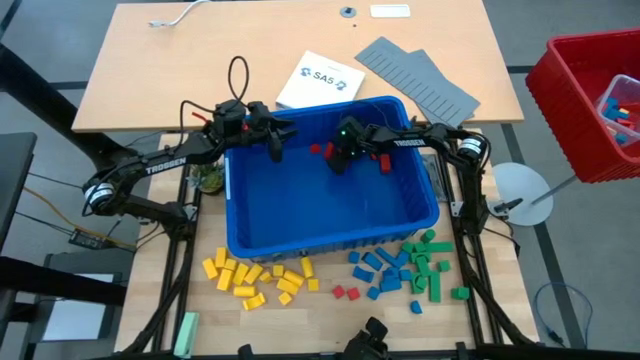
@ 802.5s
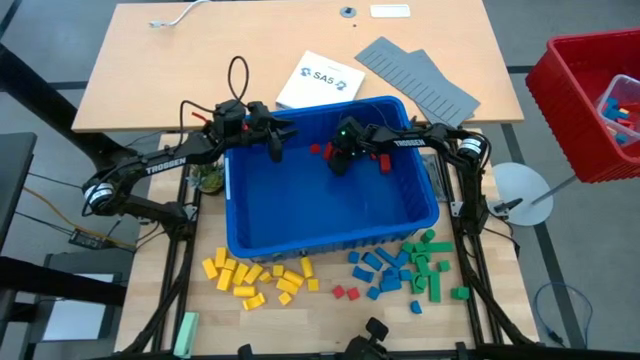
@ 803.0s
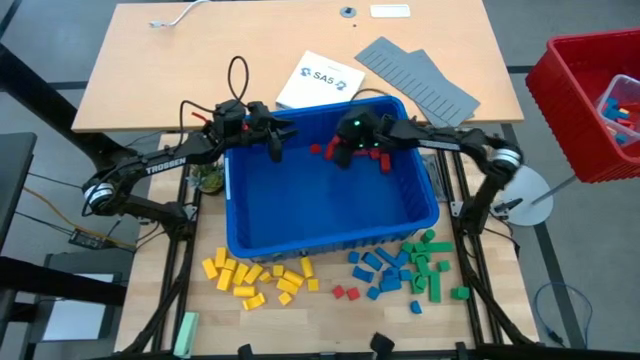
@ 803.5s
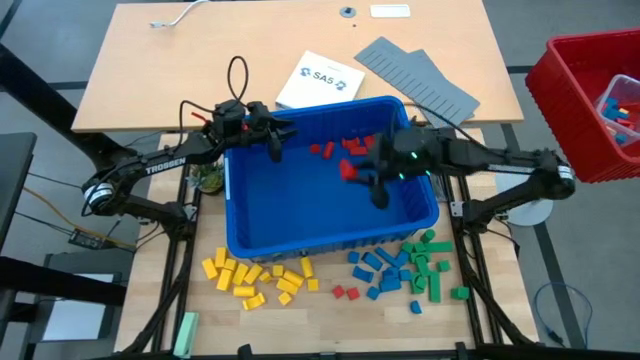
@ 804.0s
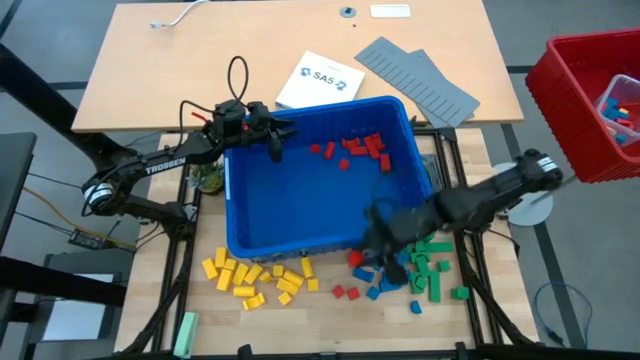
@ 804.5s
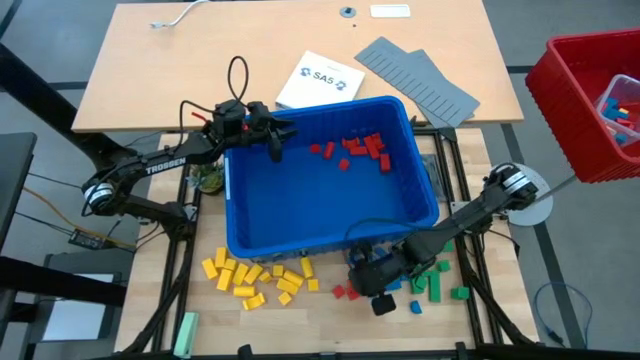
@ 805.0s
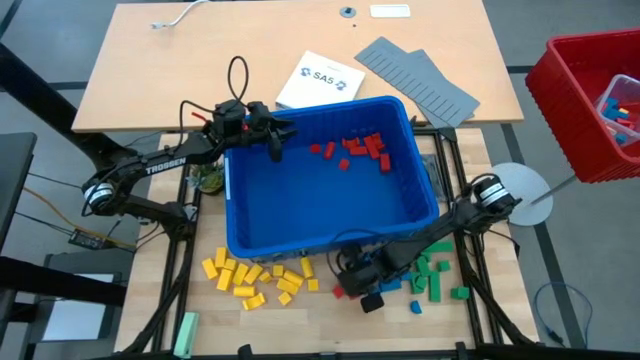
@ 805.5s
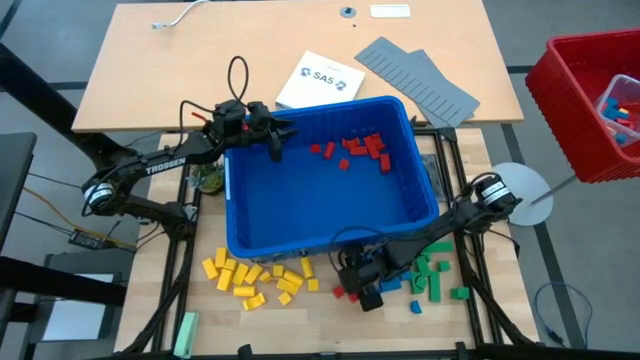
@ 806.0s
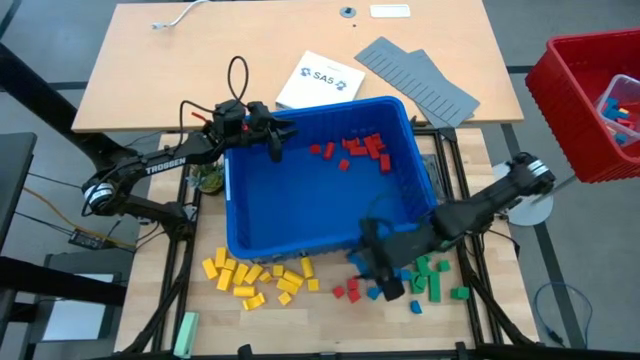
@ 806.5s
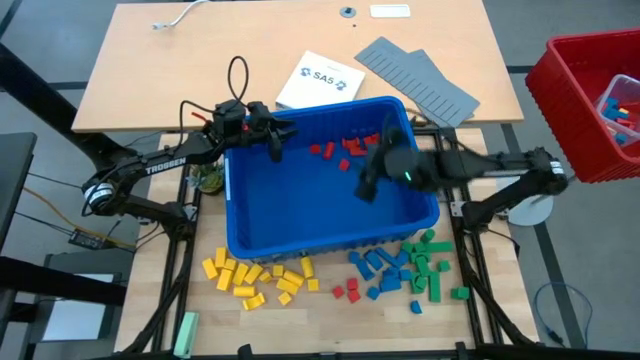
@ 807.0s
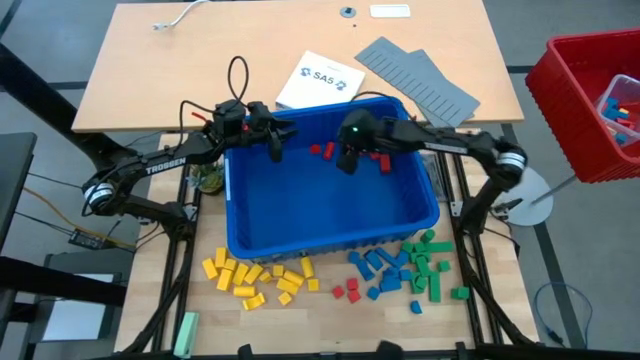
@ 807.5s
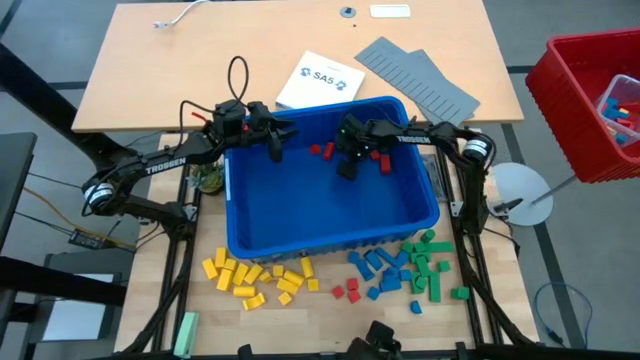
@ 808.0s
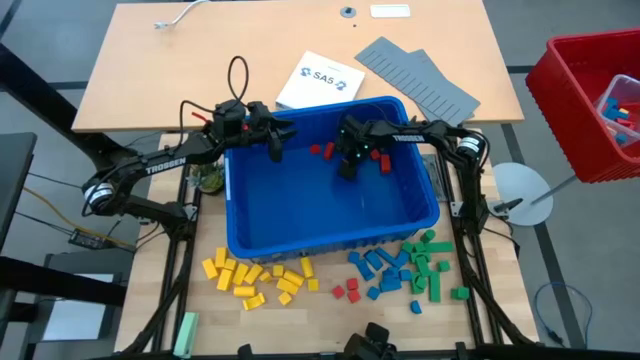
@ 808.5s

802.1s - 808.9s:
Task: Sort blocks
Remove the red block from the blue bin

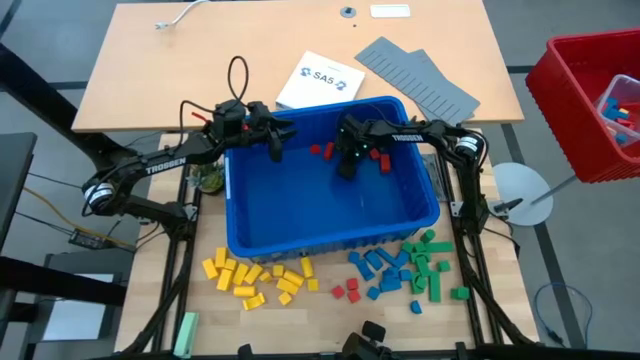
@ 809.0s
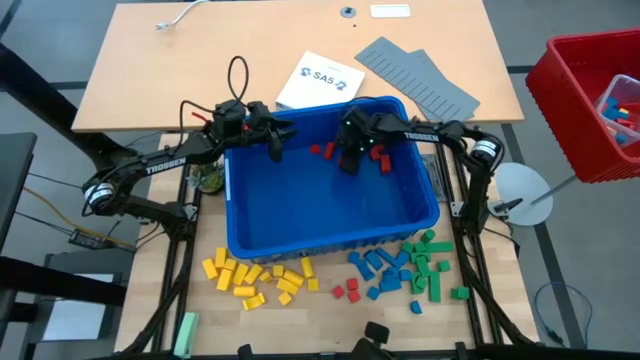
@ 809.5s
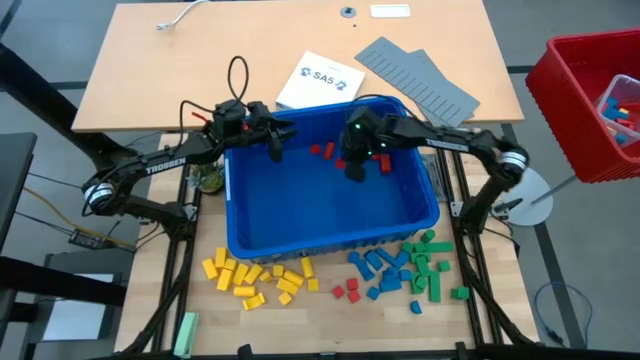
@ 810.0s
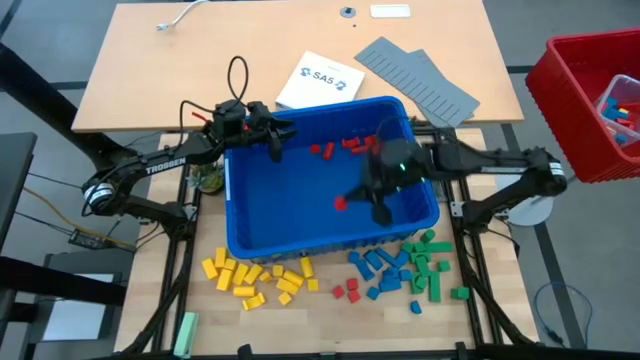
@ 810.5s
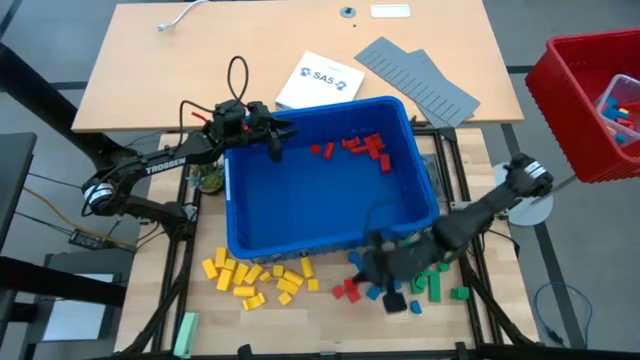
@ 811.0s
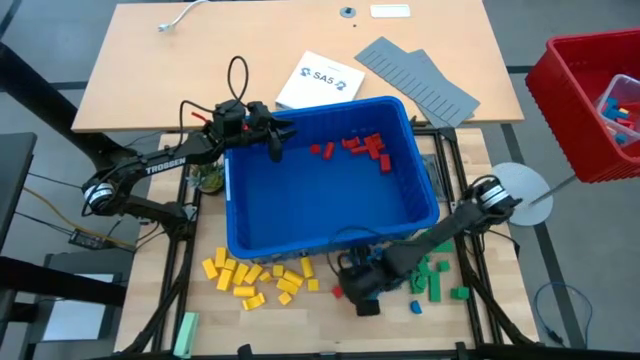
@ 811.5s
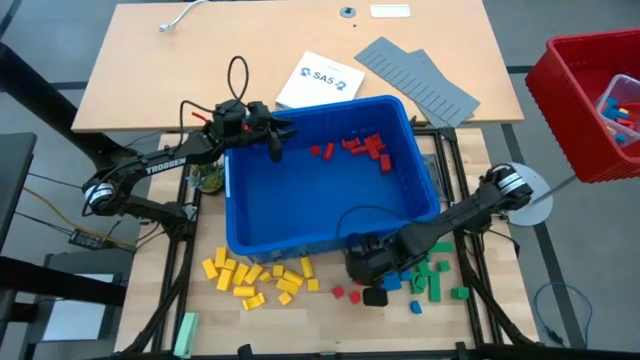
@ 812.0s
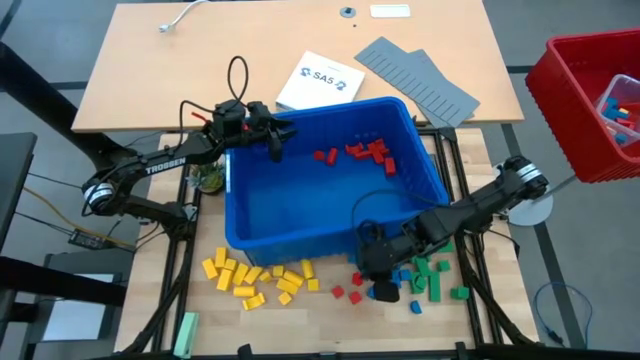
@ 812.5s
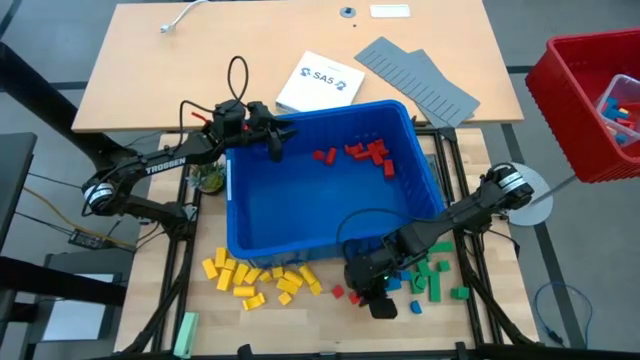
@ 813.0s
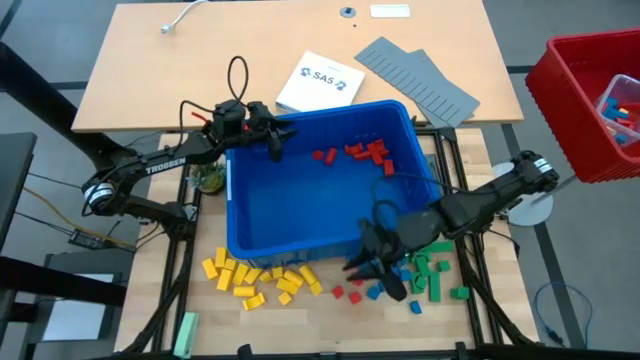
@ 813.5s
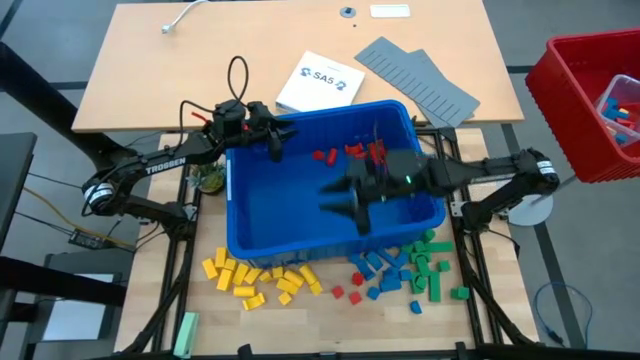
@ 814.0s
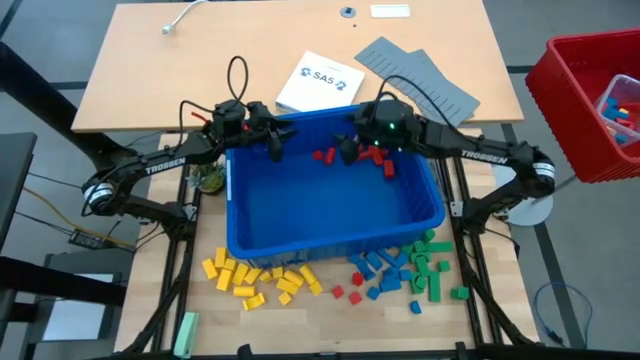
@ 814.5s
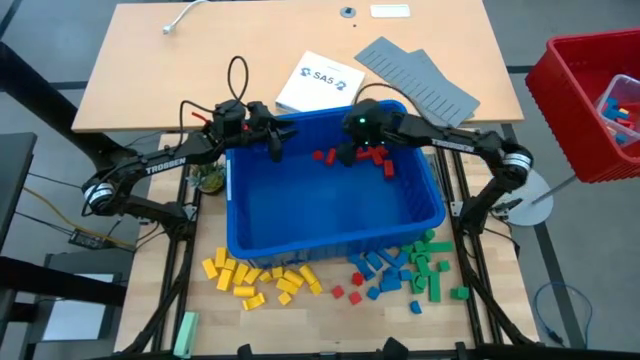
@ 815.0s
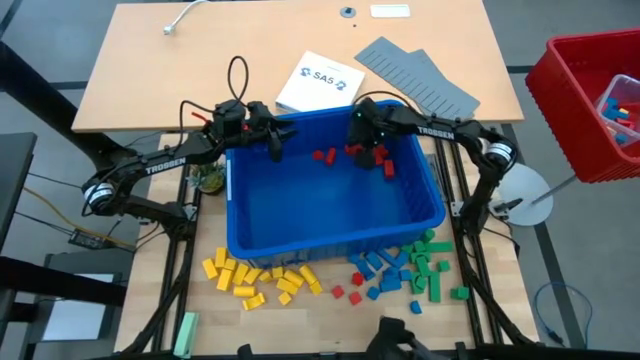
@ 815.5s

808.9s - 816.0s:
Remove the red block from the blue bin

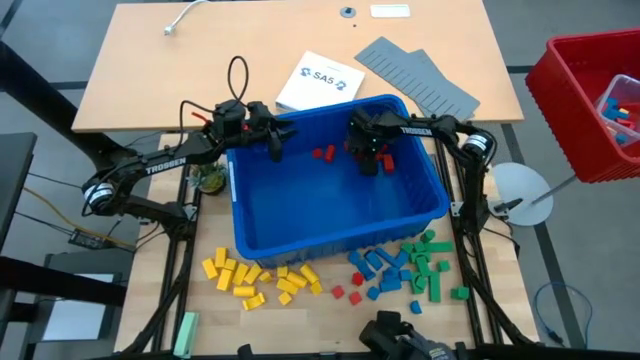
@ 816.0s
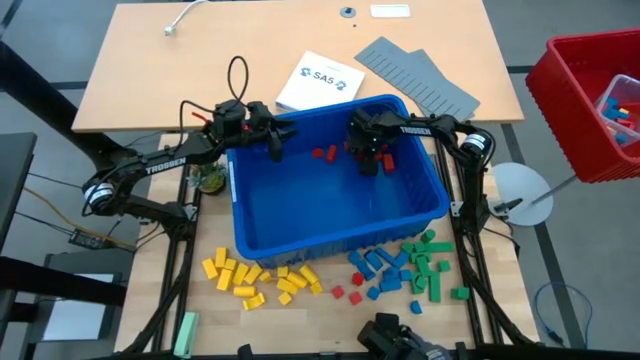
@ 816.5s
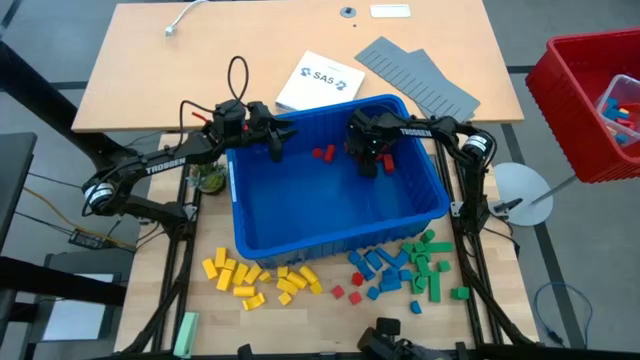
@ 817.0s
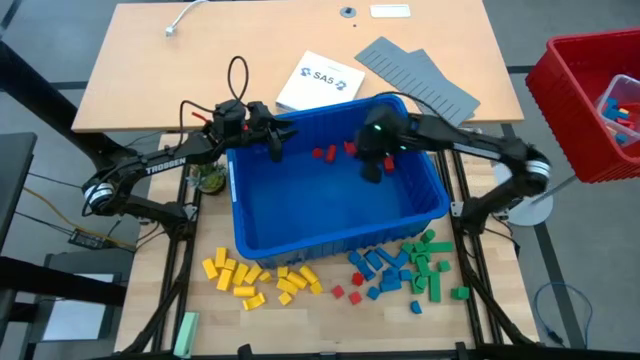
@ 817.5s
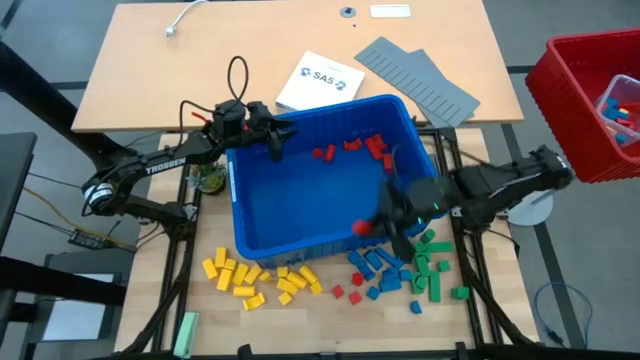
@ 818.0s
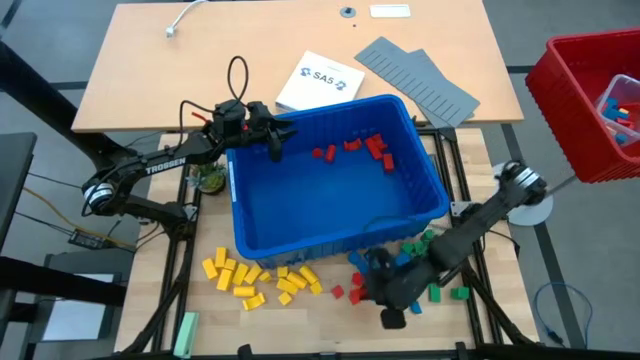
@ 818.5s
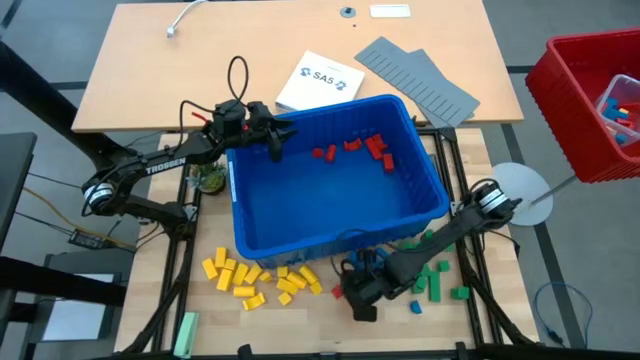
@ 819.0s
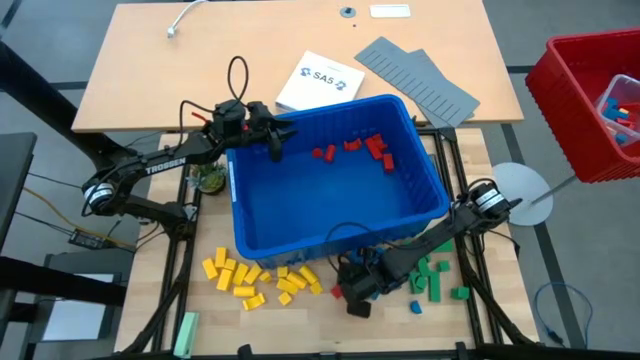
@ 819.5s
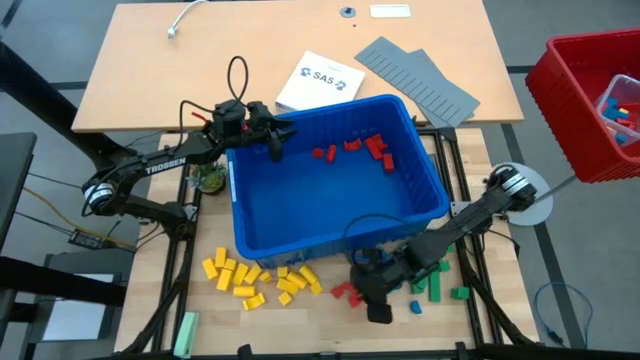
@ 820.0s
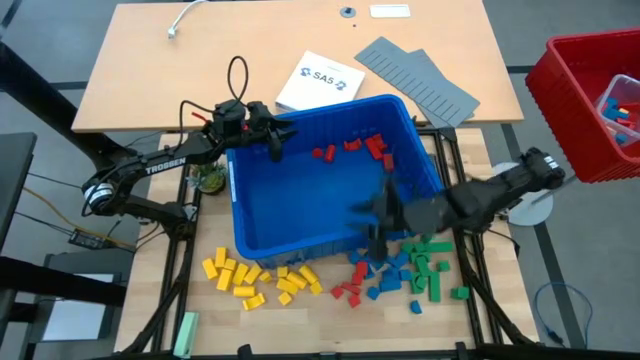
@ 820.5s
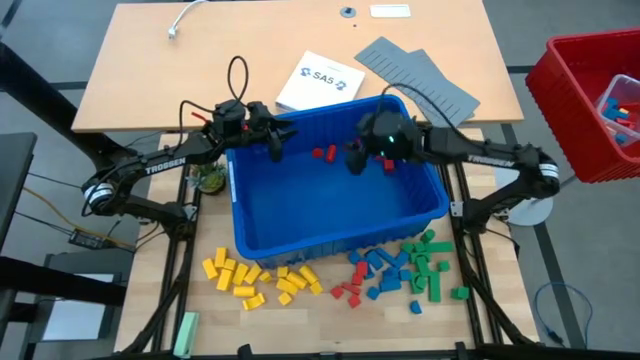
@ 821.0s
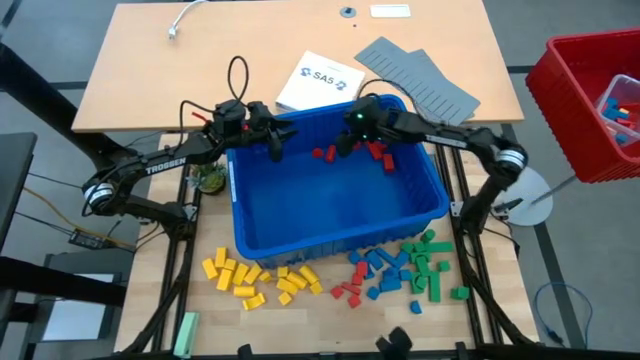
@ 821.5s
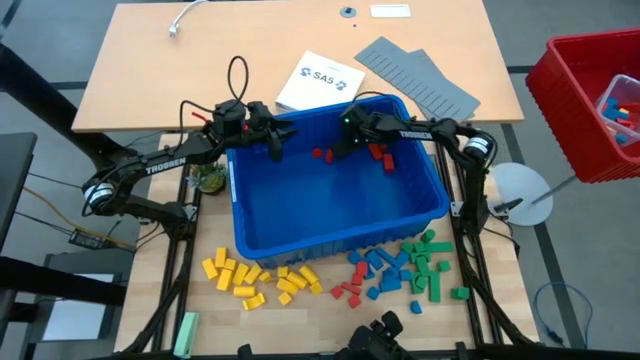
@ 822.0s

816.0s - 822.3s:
Remove the red block from the blue bin
